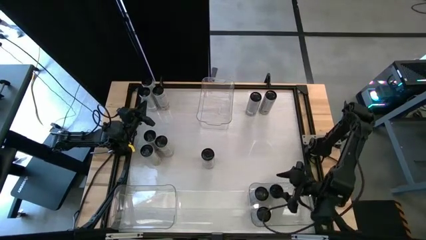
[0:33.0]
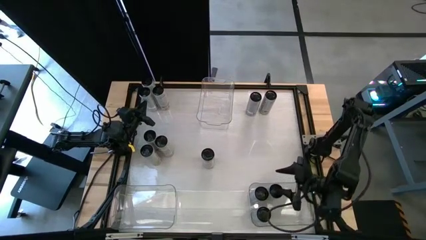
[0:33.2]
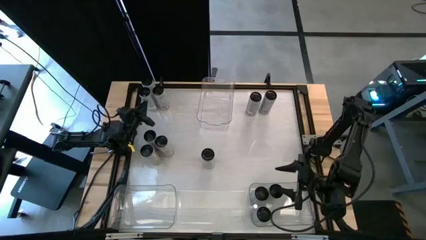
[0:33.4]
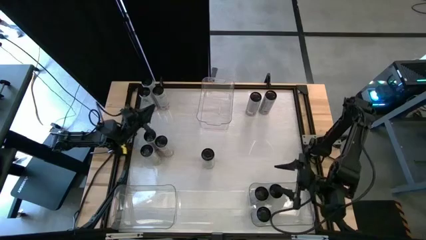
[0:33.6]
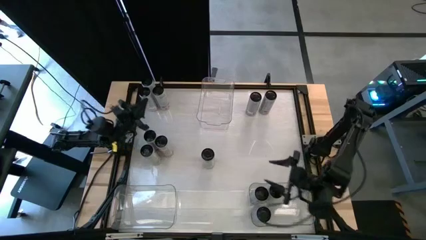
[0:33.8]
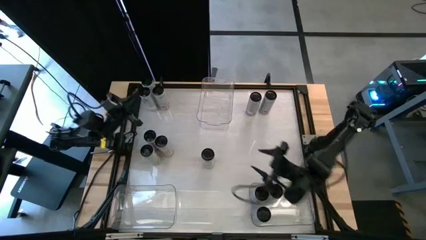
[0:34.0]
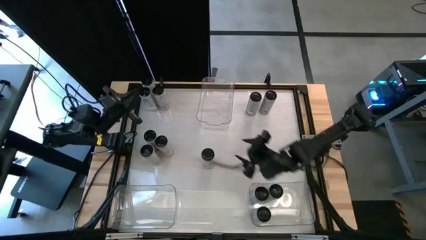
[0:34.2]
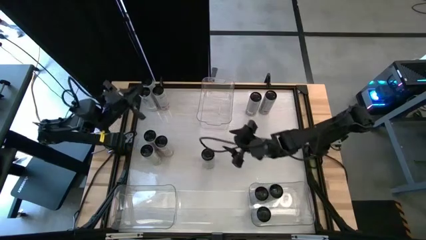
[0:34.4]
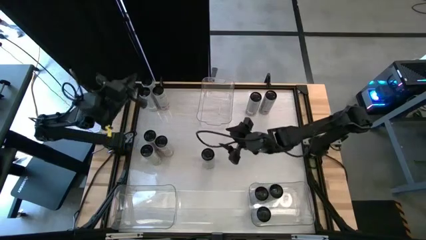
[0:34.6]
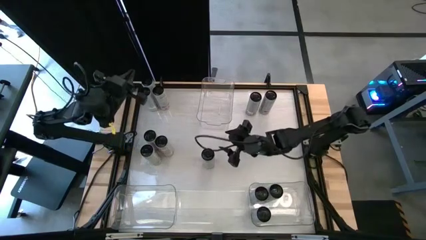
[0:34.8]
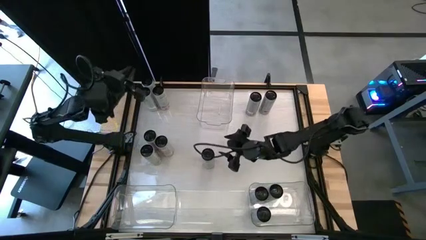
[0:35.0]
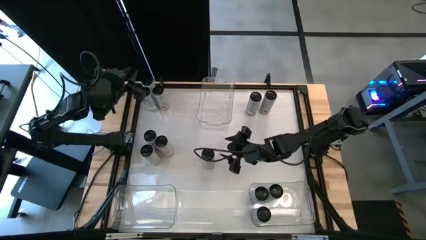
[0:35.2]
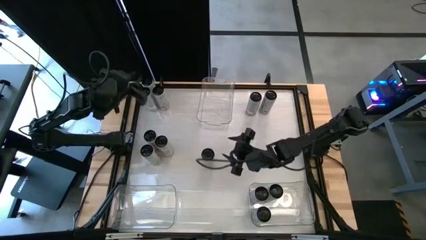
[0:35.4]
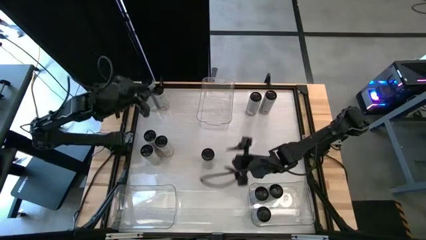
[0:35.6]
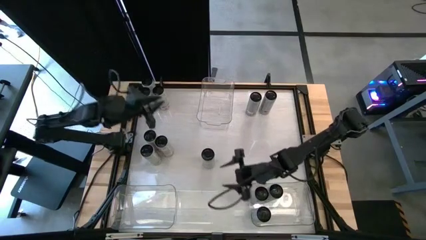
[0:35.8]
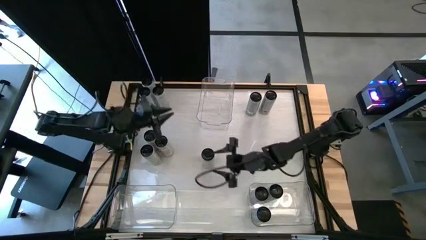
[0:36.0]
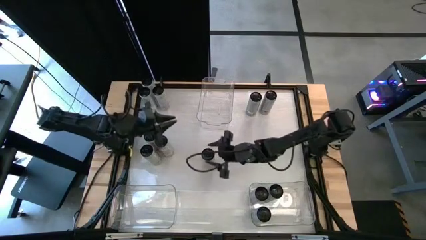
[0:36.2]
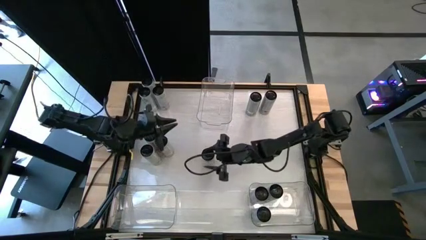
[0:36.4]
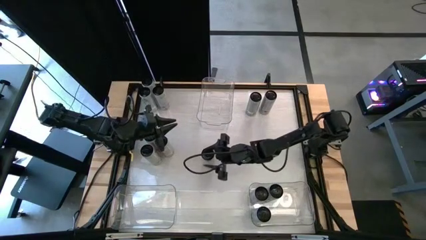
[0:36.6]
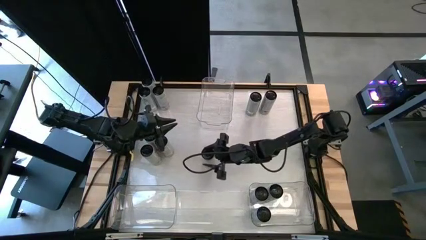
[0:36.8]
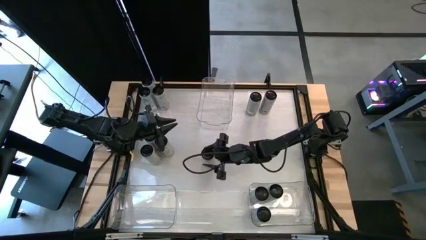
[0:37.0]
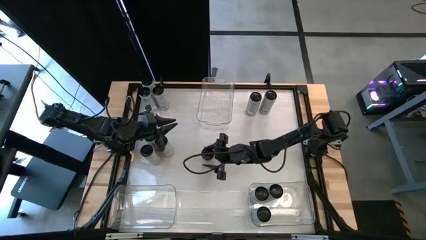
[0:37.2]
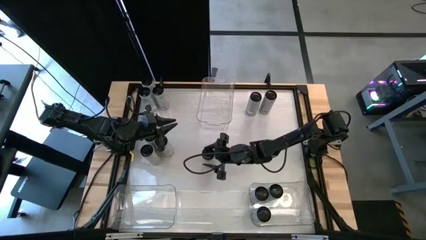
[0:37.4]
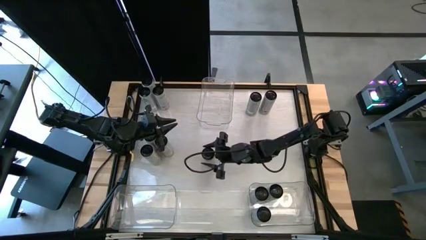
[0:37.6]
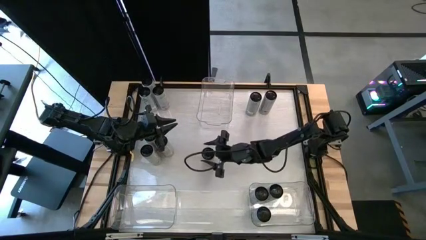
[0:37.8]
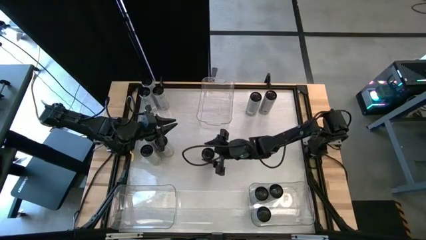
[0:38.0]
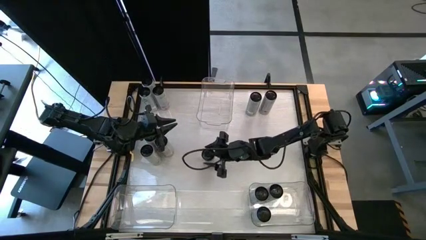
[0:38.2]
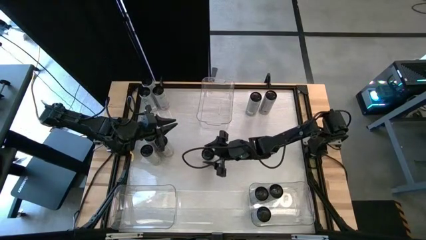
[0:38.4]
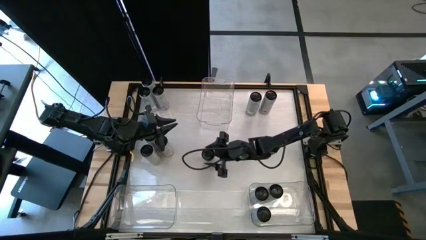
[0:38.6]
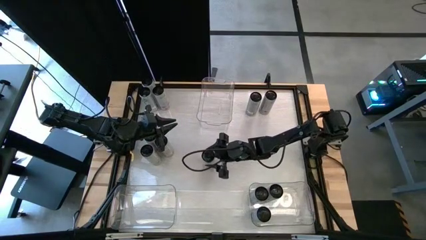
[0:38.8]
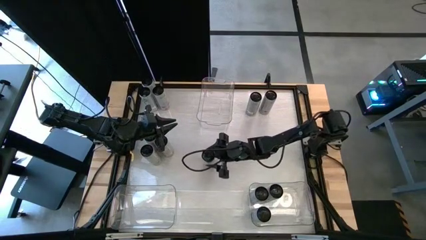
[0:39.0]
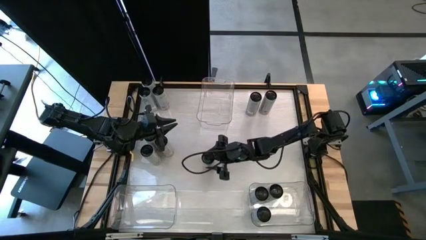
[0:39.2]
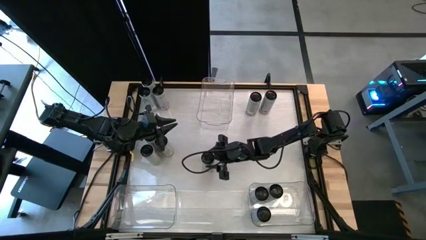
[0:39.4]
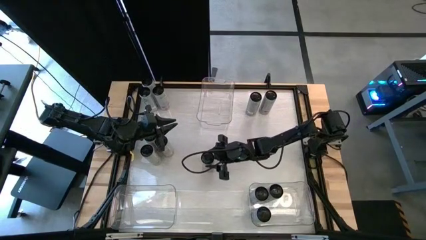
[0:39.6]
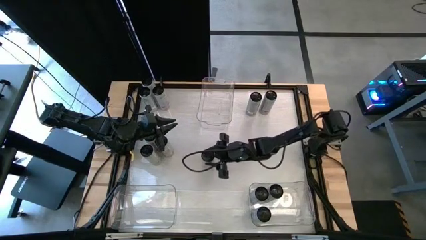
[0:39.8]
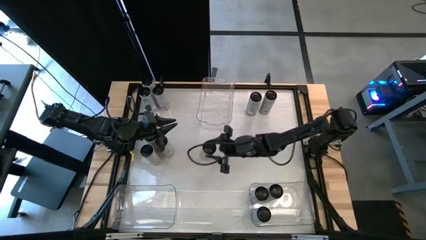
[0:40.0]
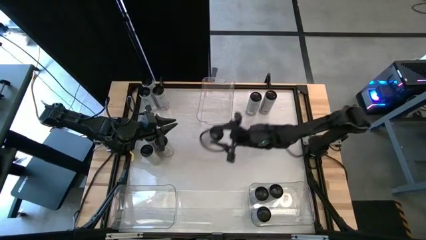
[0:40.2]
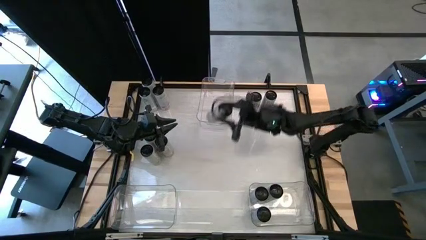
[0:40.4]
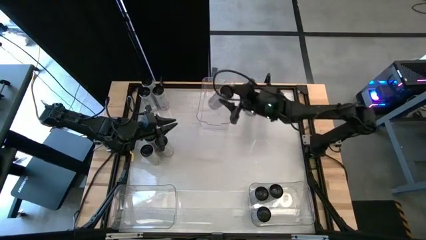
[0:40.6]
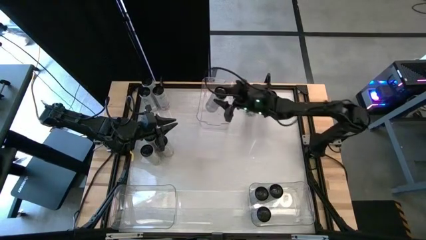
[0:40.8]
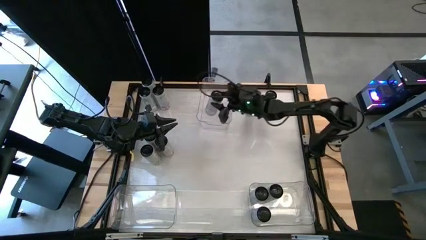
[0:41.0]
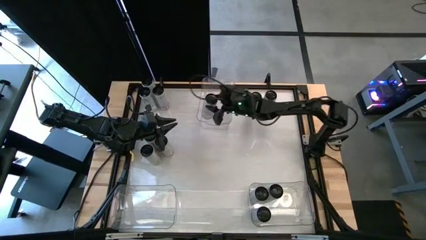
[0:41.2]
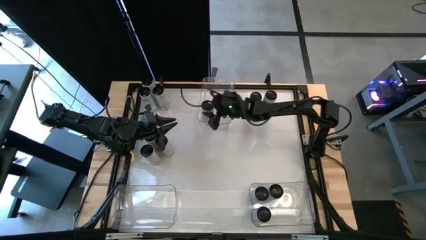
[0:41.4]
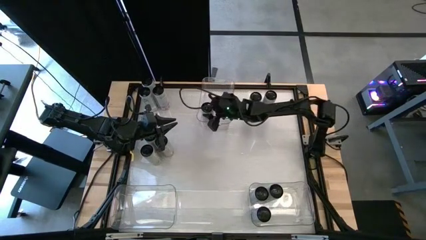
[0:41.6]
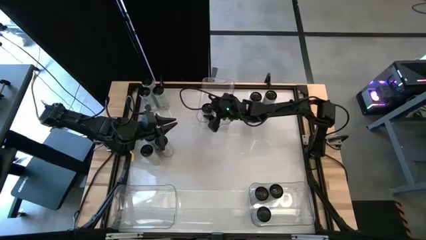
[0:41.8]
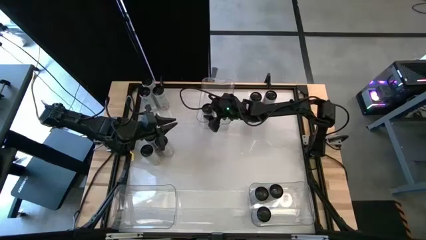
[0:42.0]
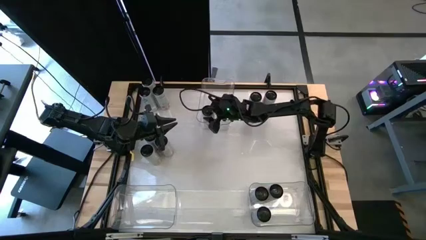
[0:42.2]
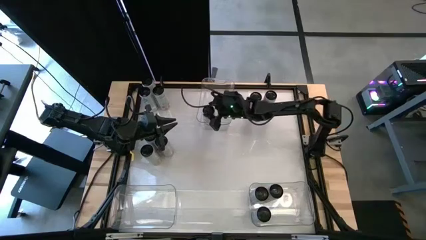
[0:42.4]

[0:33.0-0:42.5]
Task: Sort soda cans
Put the bottom right white yellow soda can into the top middle transparent bin
